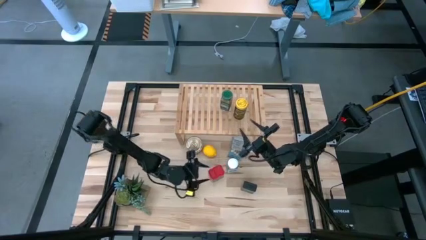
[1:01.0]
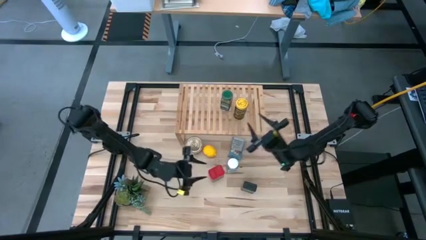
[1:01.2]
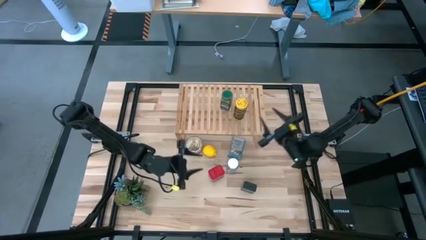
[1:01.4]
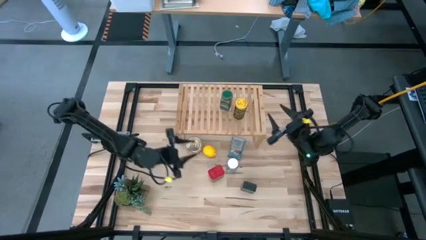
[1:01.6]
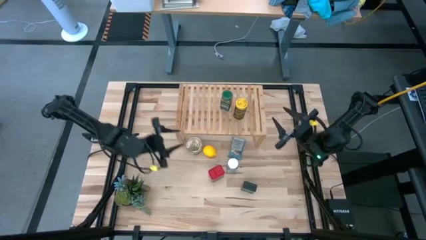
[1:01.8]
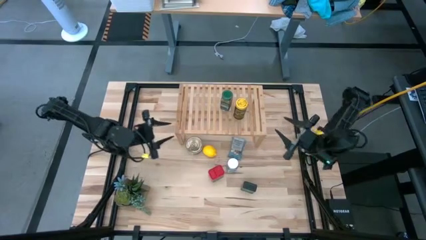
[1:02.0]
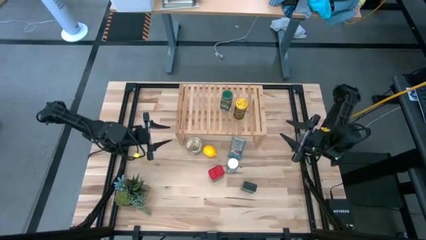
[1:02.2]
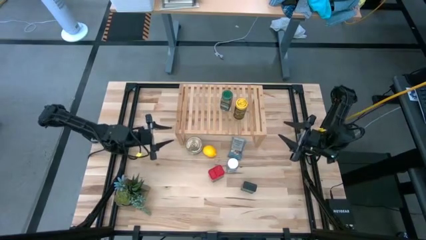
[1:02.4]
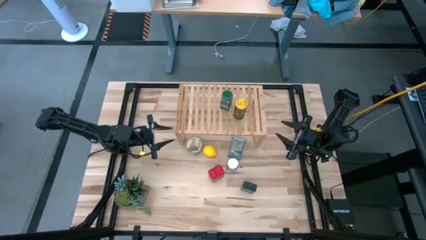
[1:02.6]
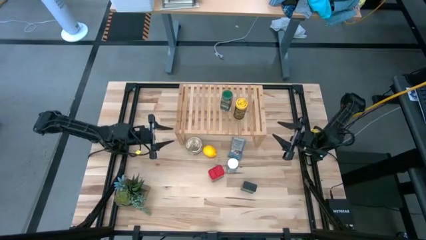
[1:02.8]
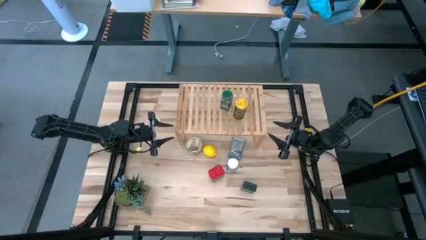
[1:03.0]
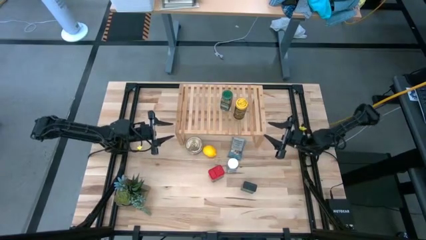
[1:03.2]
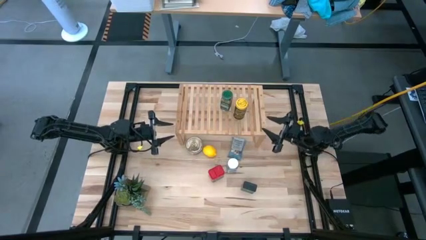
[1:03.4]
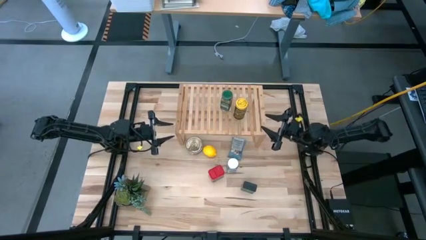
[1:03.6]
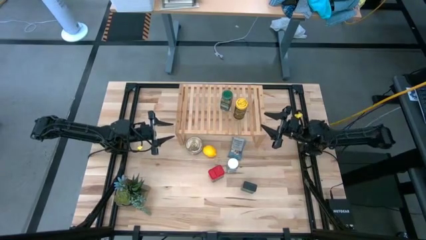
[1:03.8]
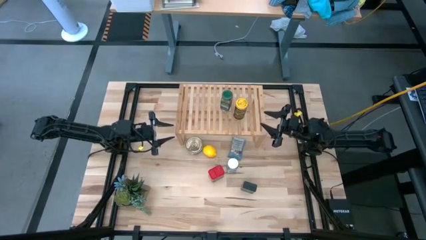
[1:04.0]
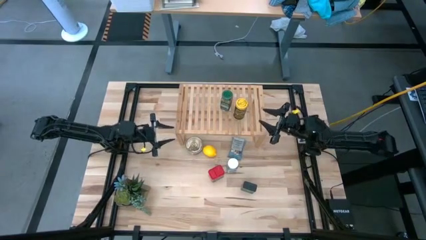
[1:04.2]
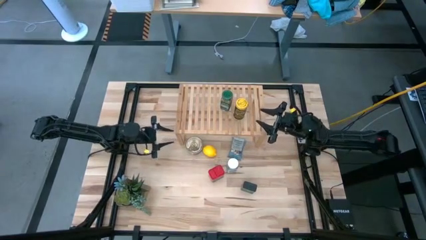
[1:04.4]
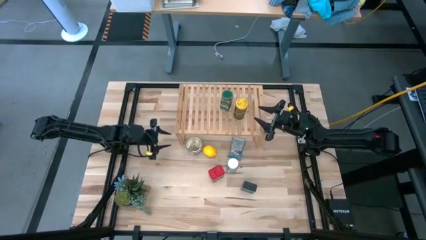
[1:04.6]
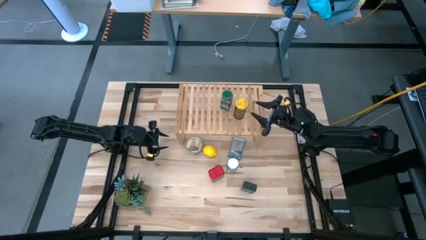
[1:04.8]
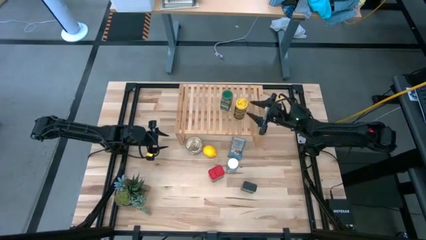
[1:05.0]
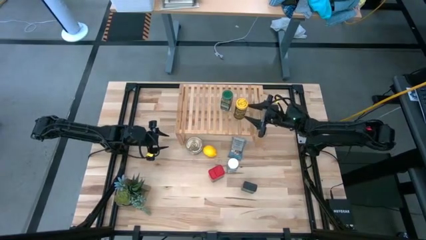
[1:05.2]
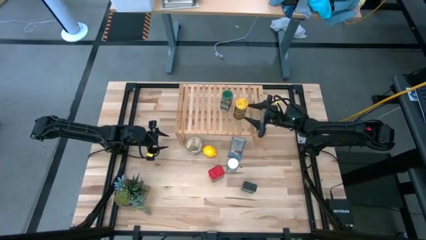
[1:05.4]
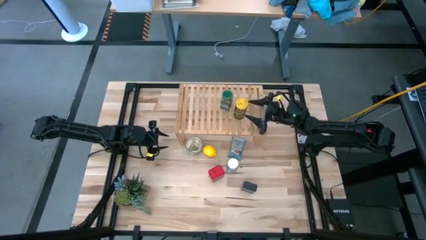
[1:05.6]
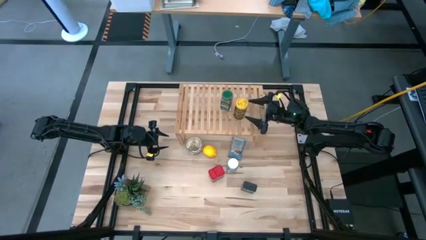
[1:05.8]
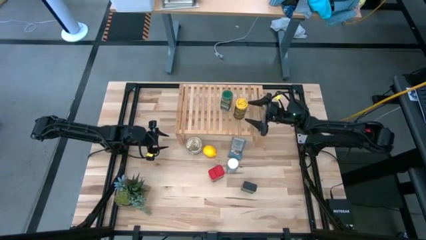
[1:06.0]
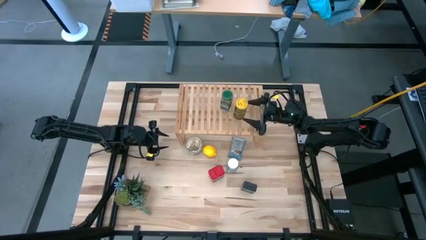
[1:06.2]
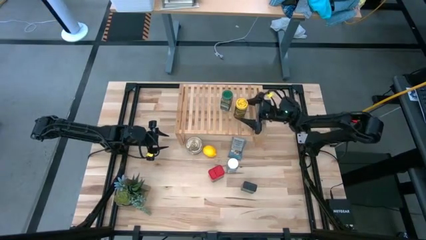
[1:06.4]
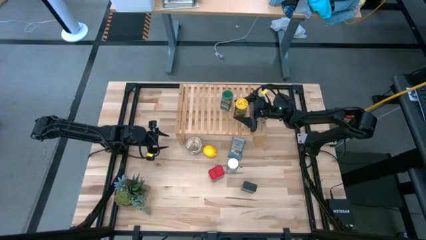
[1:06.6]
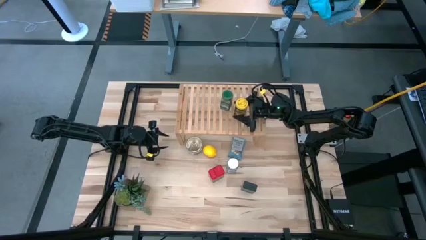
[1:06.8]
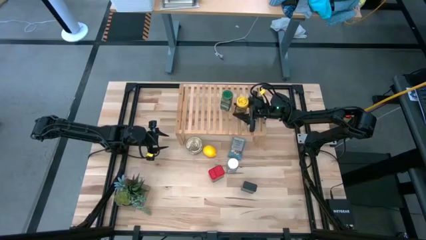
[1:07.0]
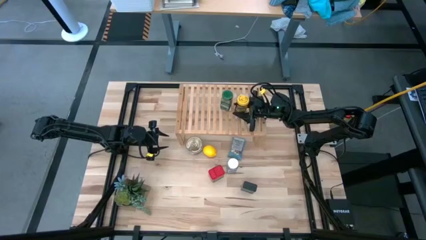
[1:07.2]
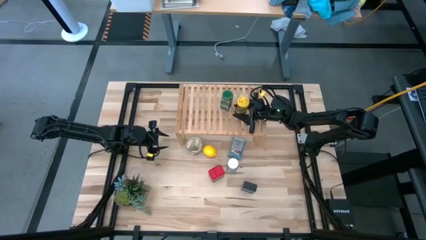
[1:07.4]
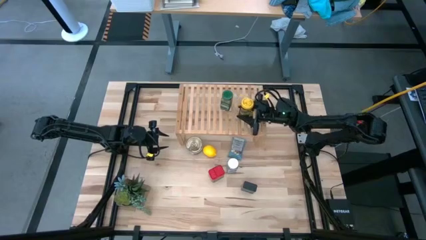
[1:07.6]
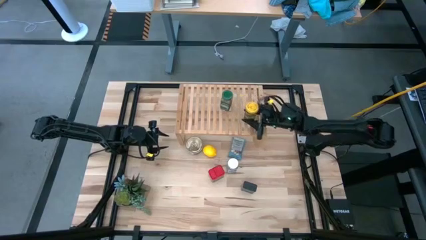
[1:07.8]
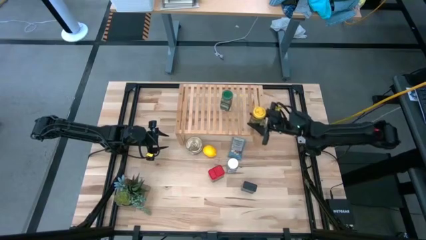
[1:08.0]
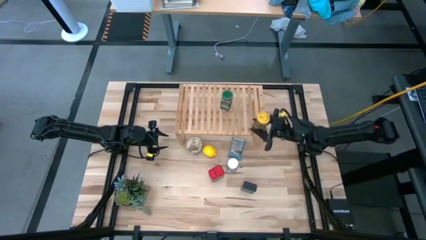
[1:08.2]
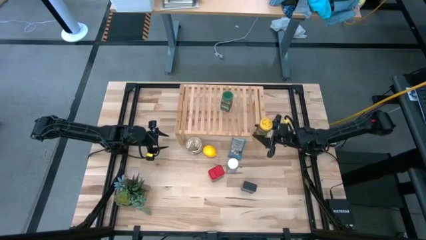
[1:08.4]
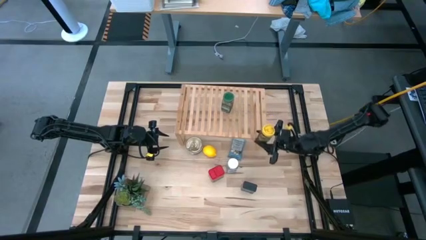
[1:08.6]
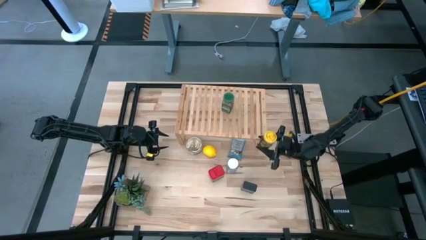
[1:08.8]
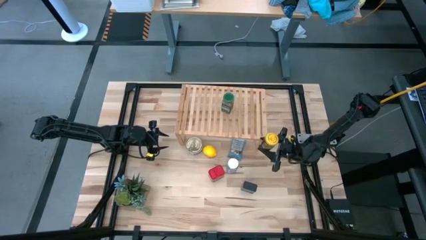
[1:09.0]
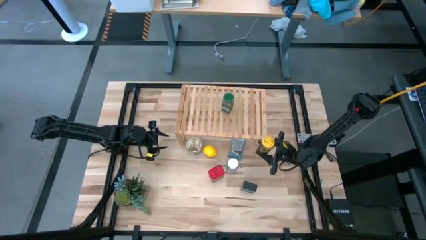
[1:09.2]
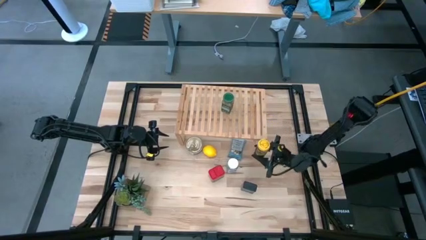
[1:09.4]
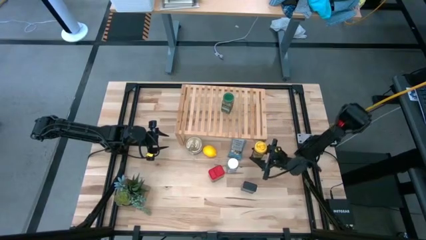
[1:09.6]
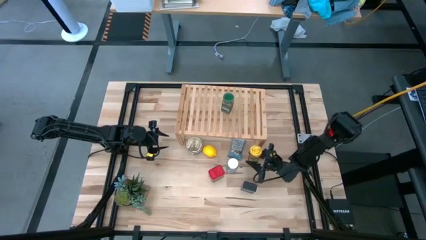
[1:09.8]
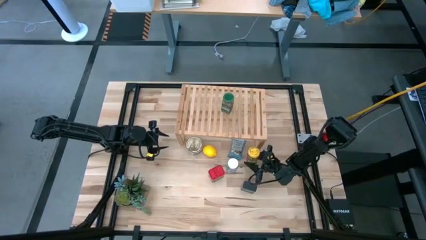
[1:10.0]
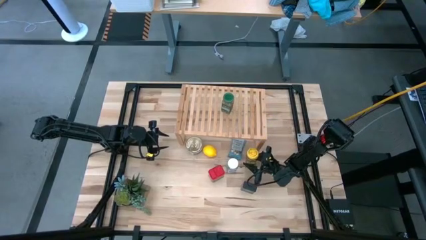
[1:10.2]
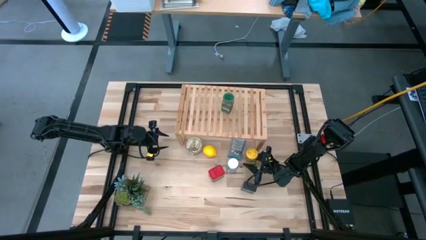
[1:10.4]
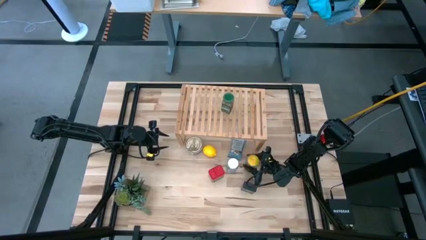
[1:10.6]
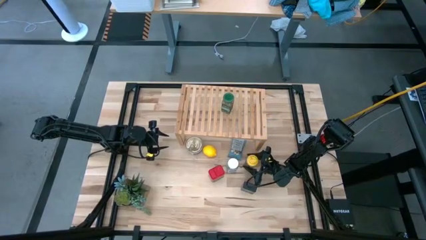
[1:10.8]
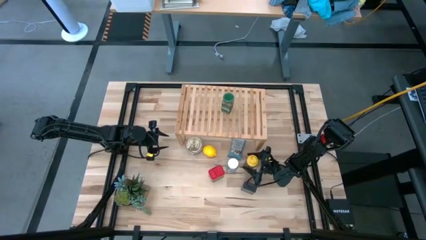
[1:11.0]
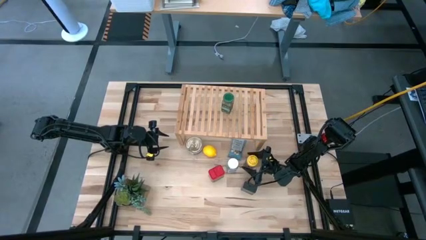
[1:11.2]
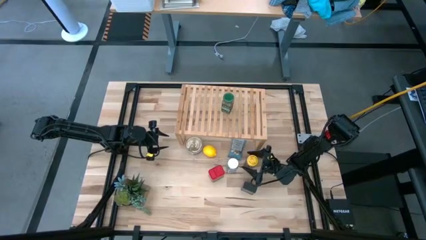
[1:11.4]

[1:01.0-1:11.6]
Task: Shelf spices
Remove the yellow seasoning bottle from the shelf

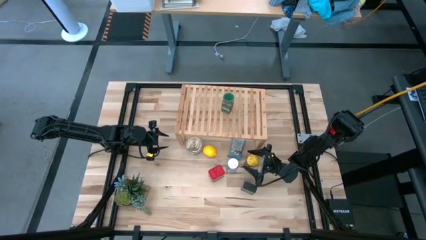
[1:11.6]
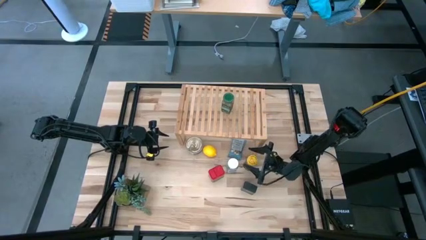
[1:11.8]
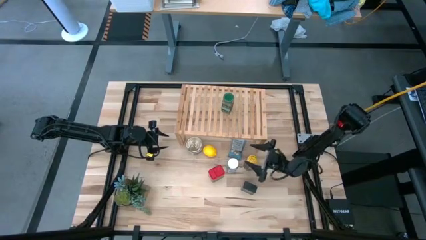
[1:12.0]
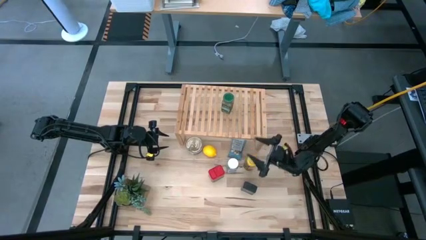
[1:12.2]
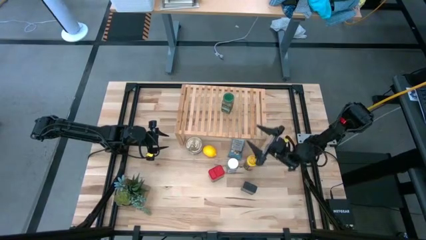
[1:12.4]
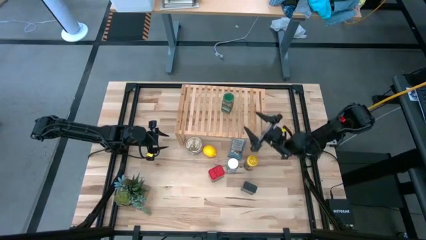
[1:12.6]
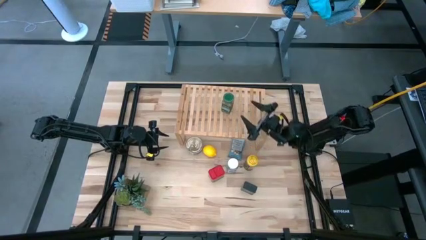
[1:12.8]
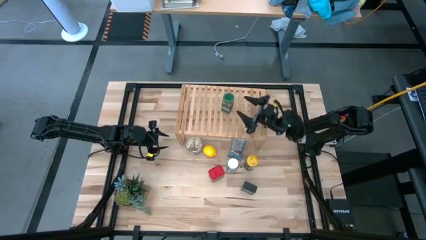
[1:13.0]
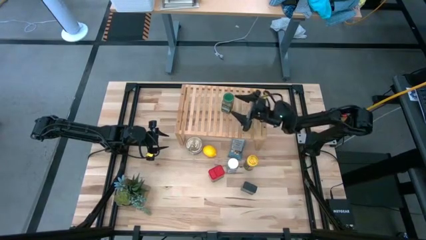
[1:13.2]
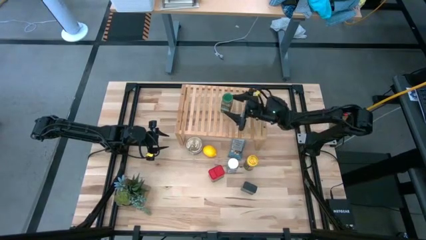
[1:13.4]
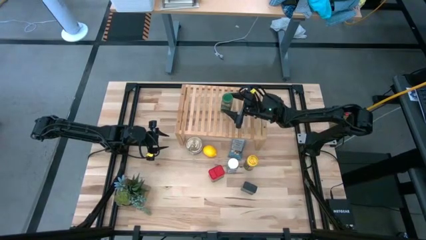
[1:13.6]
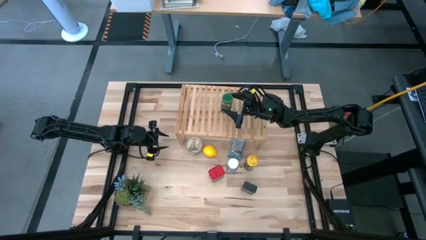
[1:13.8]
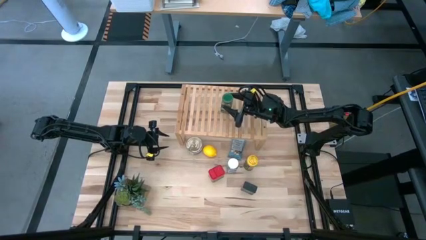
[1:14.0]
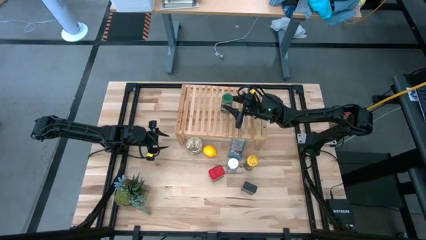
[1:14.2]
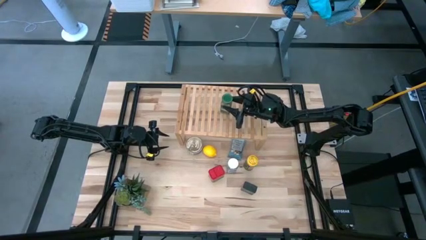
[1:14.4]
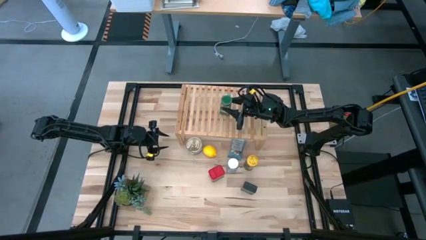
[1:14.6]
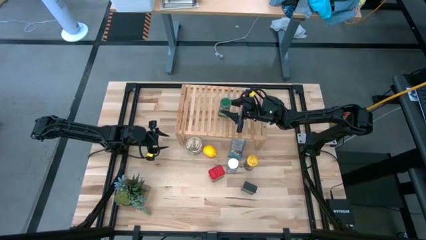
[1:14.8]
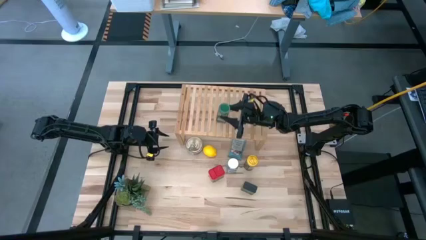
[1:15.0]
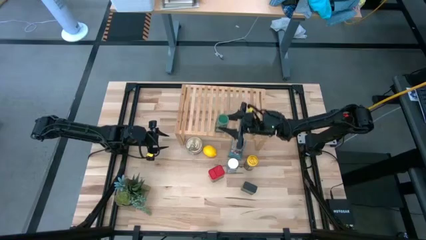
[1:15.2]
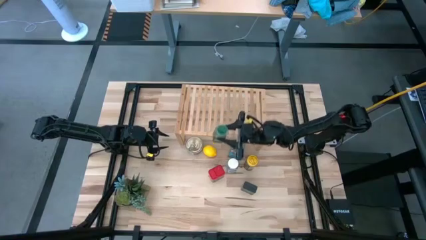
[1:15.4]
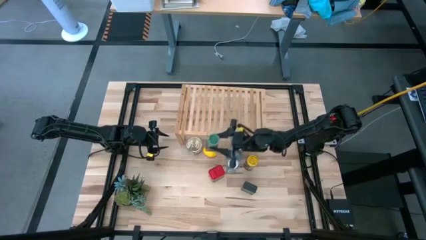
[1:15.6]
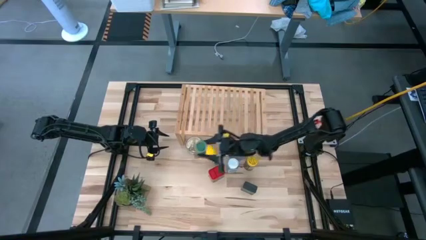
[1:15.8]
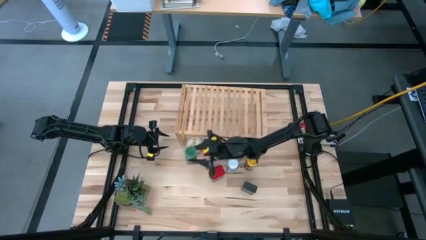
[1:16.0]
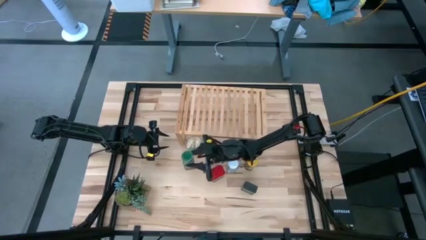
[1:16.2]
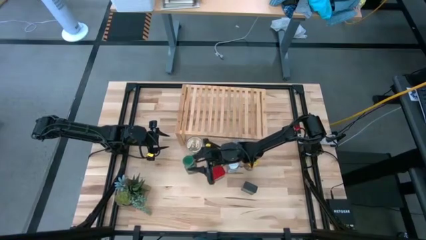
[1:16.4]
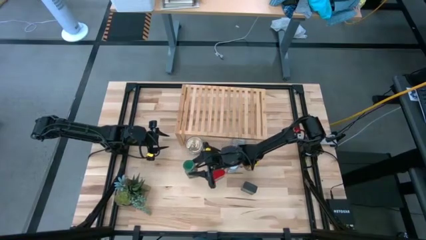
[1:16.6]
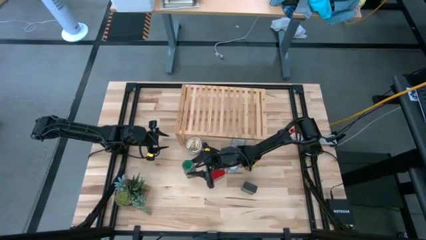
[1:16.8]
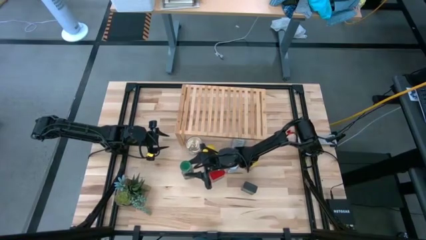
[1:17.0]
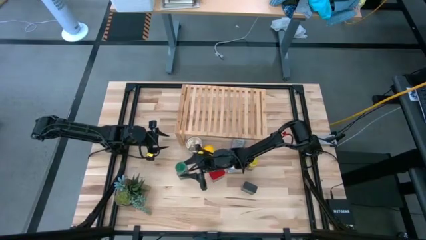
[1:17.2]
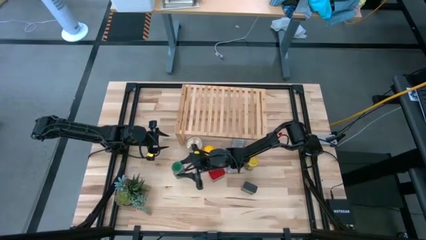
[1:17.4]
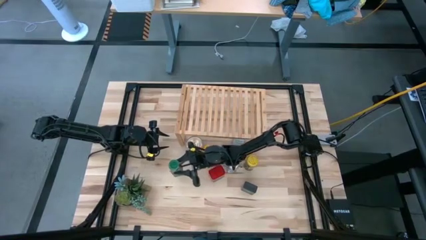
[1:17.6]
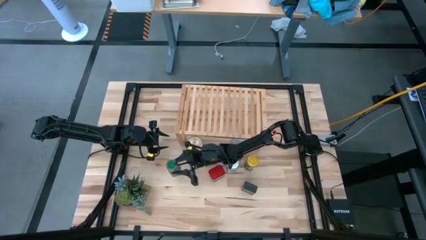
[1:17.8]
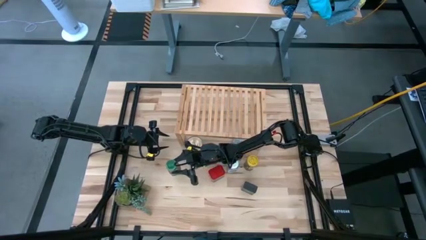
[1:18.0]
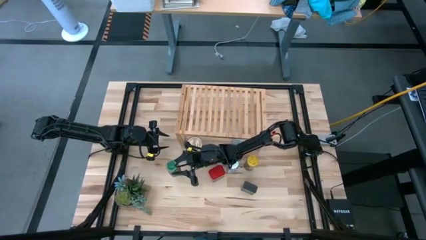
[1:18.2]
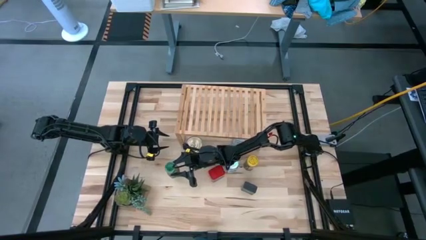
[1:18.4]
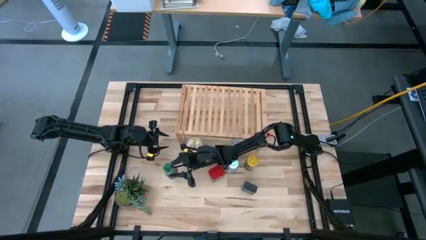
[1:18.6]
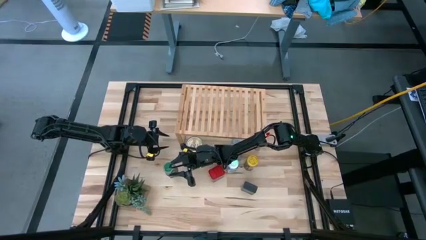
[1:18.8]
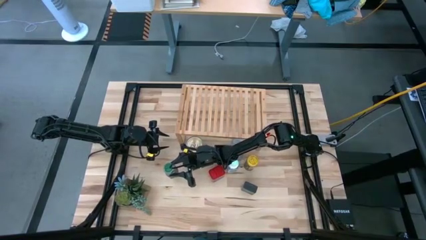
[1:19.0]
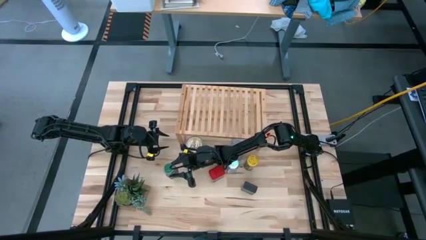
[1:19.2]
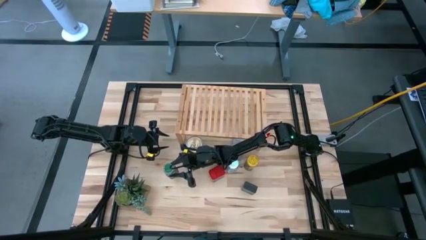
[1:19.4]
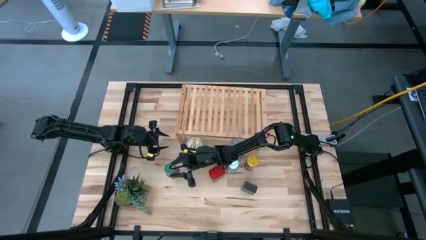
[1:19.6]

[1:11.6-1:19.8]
Remove the green seasoning bottle from the shelf
